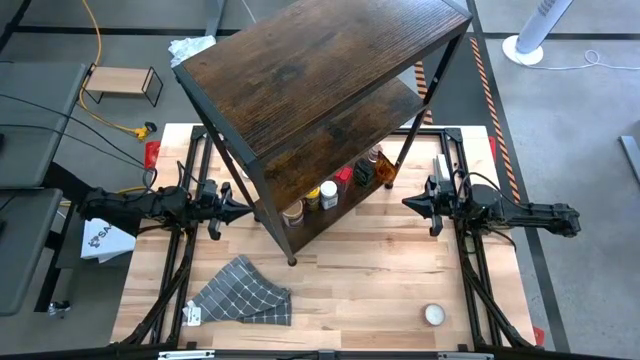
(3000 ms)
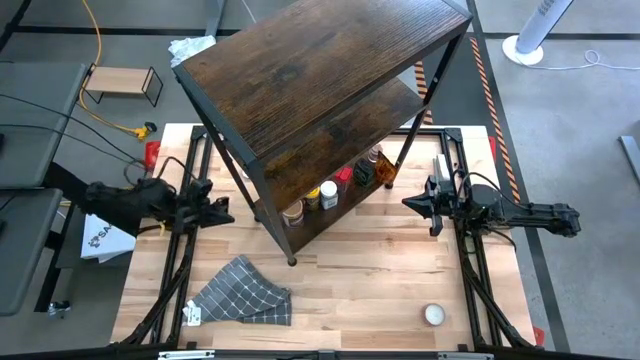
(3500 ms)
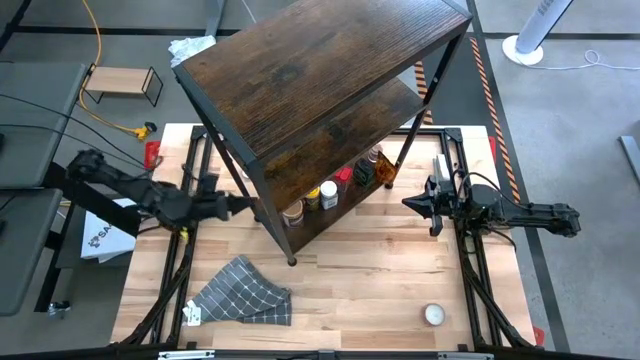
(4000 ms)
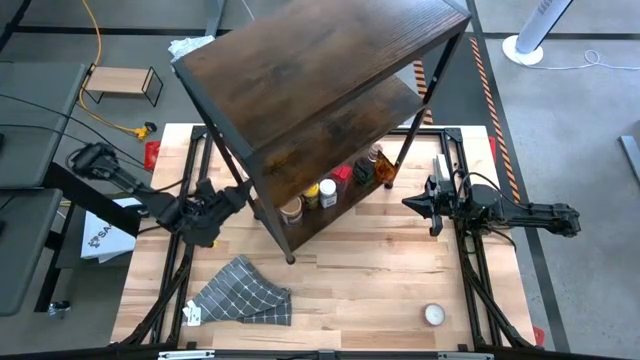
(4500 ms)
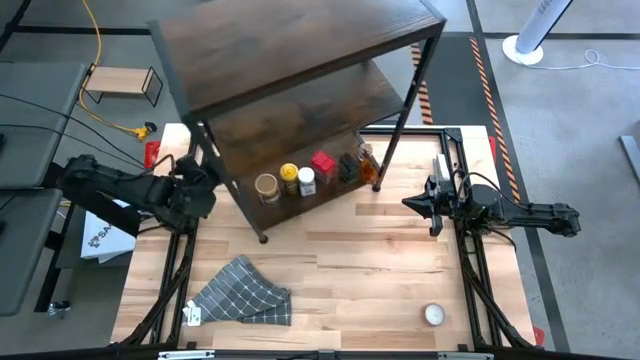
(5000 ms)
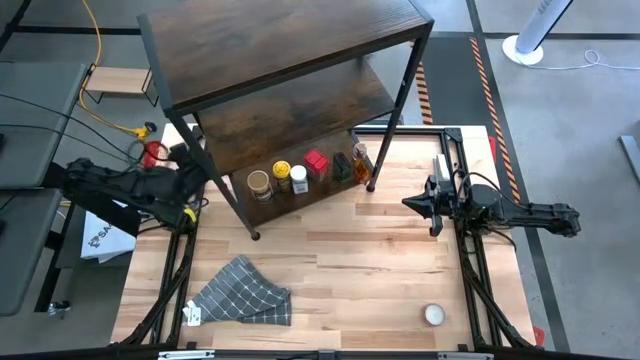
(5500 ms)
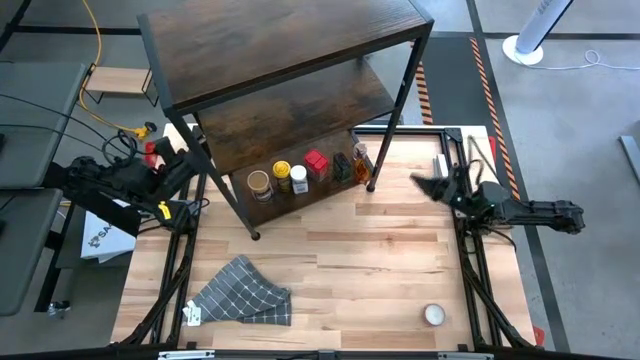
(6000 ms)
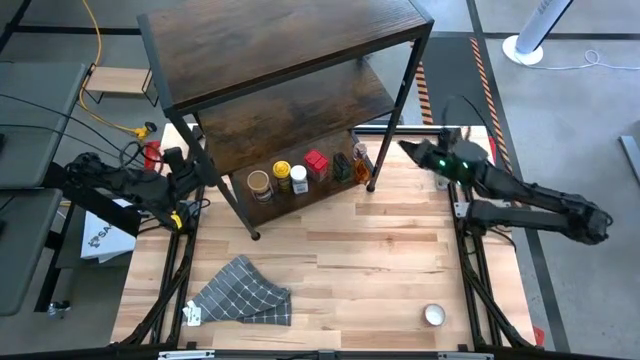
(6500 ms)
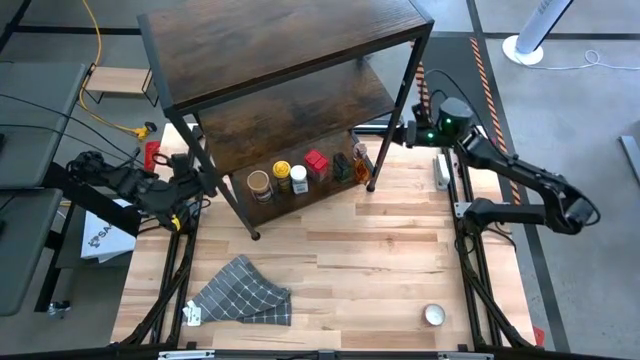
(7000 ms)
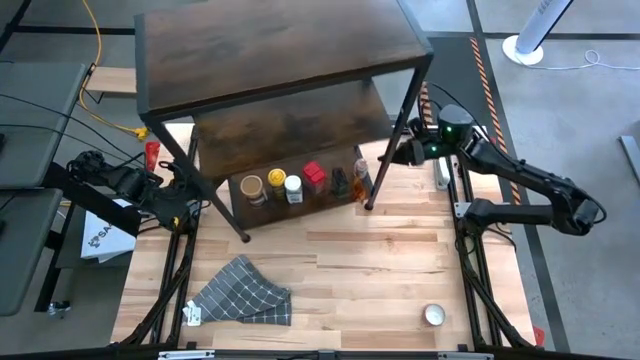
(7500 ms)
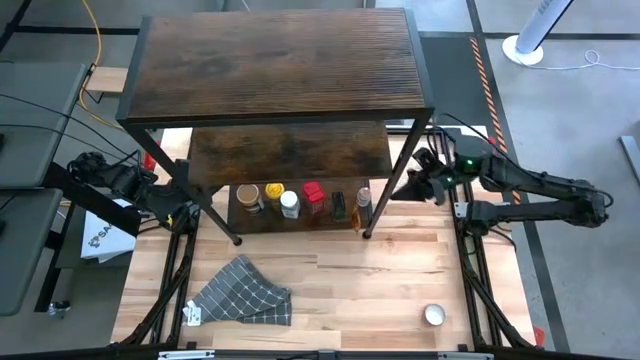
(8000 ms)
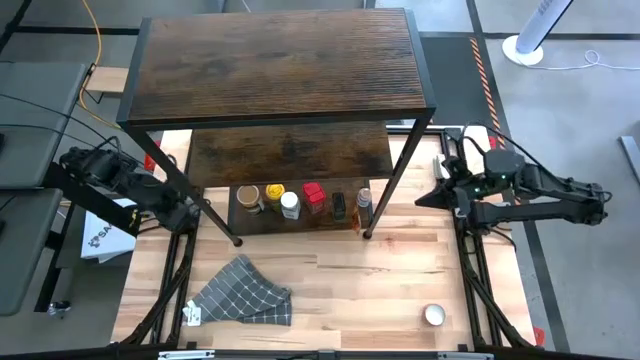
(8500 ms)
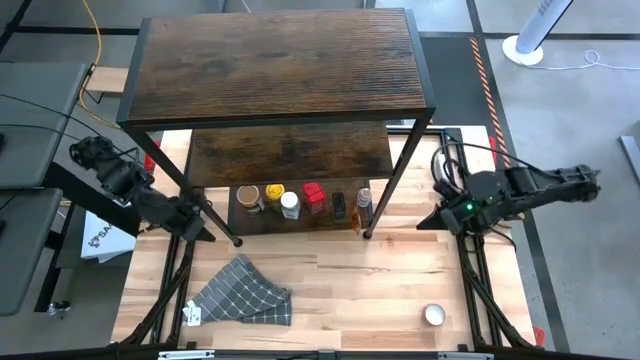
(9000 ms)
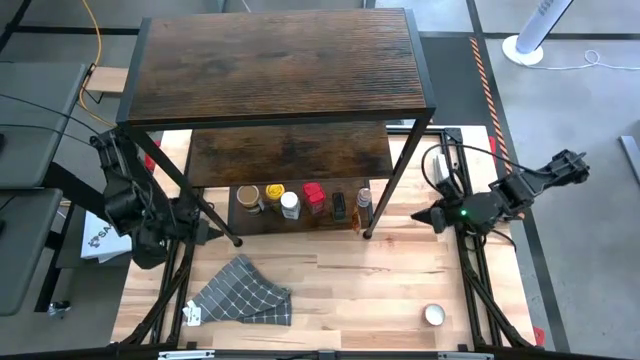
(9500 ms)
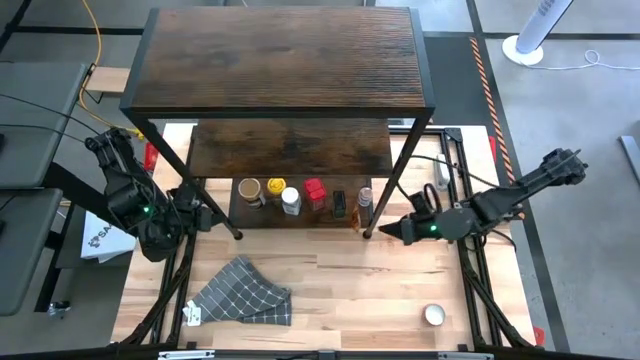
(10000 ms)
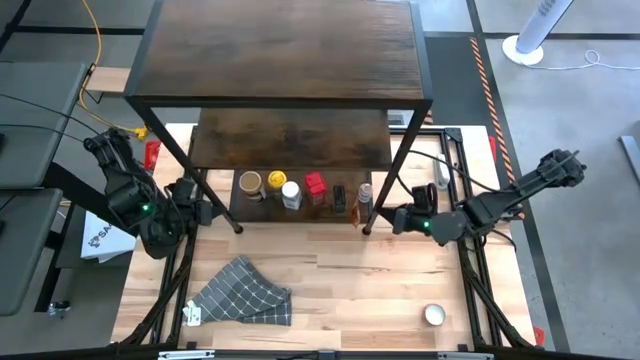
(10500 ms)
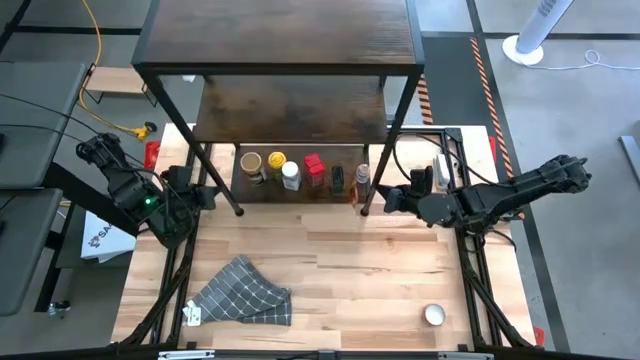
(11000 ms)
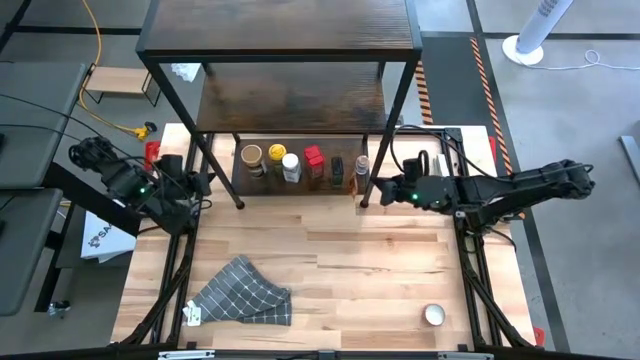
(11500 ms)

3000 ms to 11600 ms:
Task: Shelf spices
Adjust the shelf

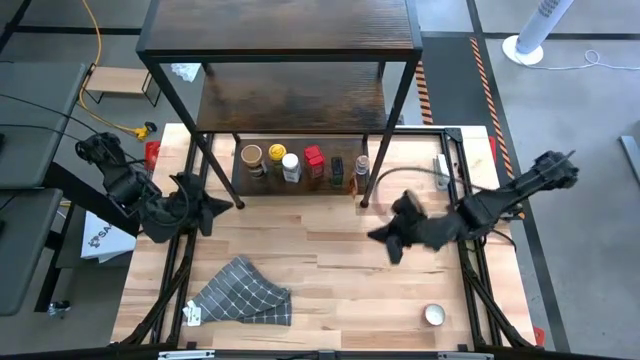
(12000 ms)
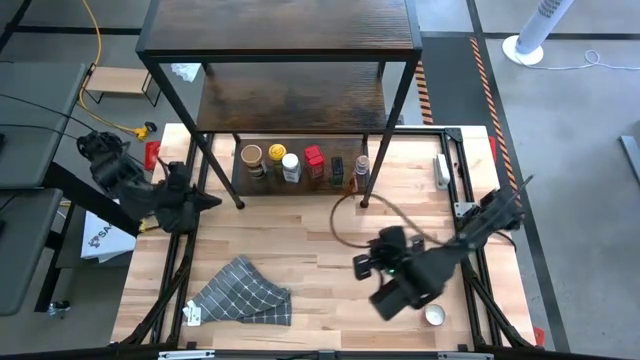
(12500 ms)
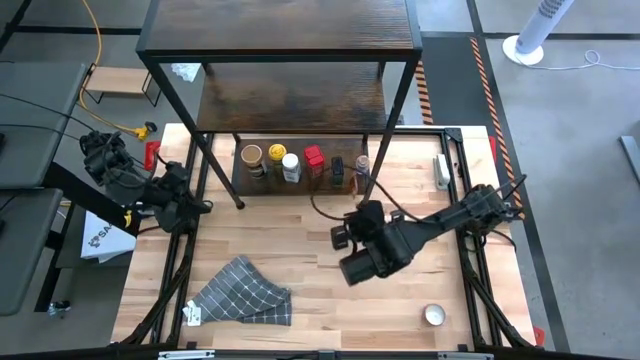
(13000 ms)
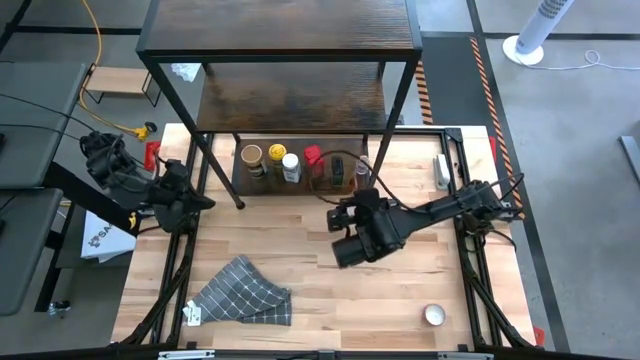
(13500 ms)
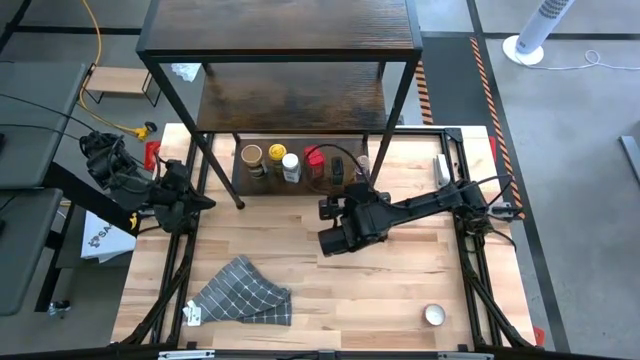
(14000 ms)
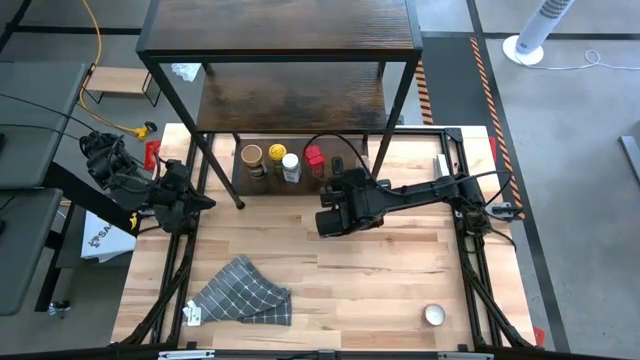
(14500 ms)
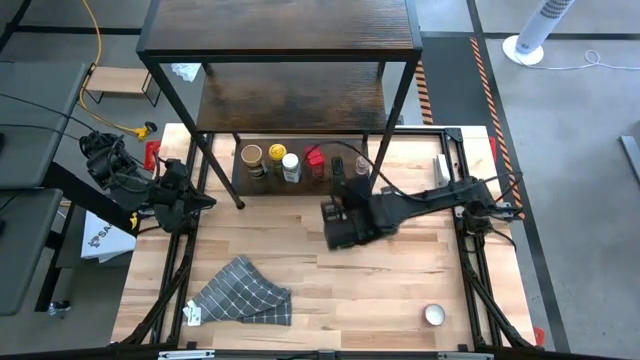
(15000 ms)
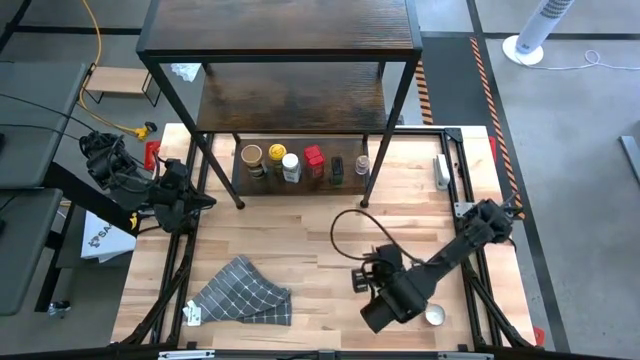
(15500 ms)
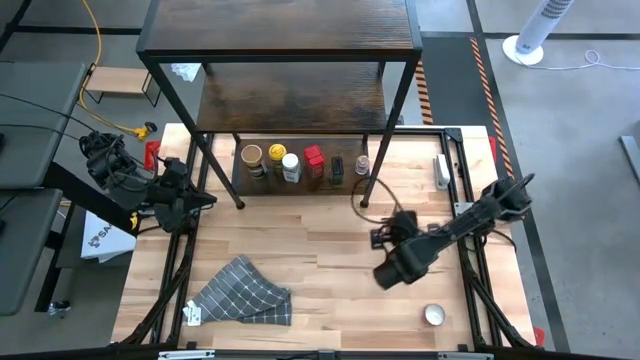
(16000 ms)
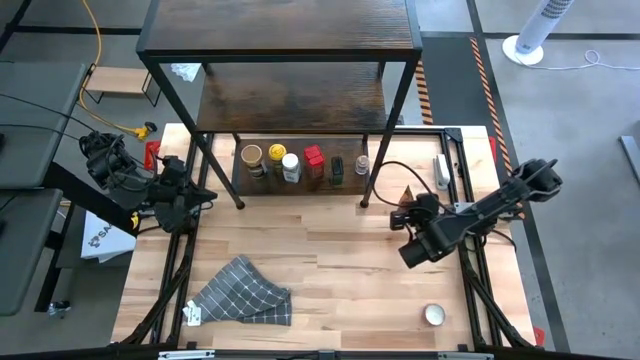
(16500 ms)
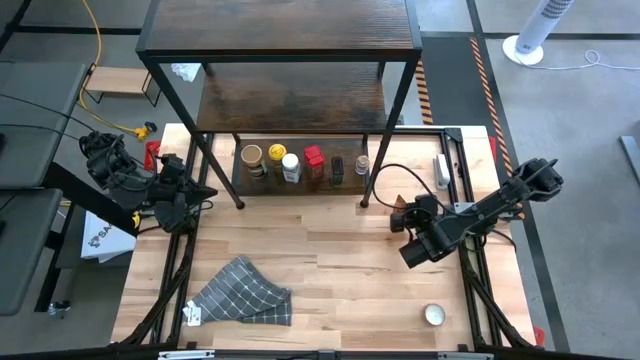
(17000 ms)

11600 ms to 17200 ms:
Remove the orange seasoning pack from the shelf

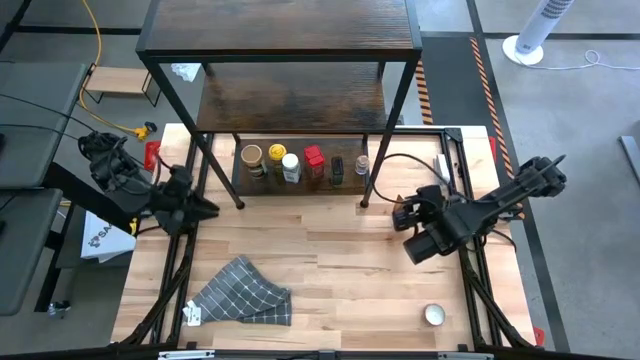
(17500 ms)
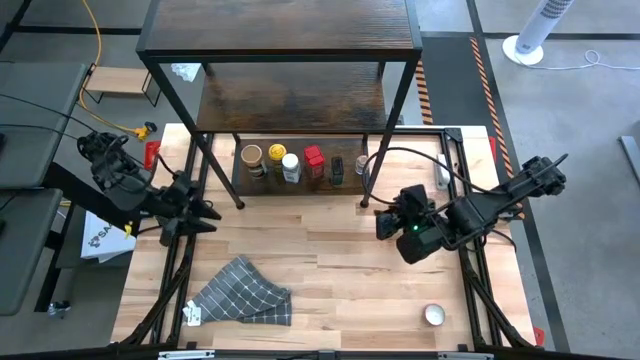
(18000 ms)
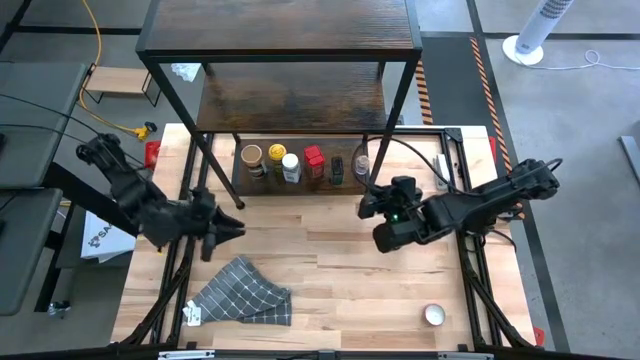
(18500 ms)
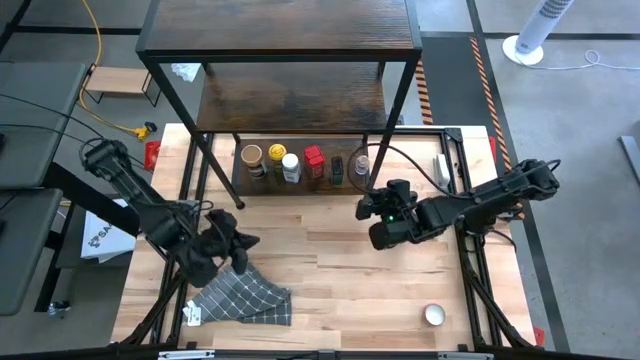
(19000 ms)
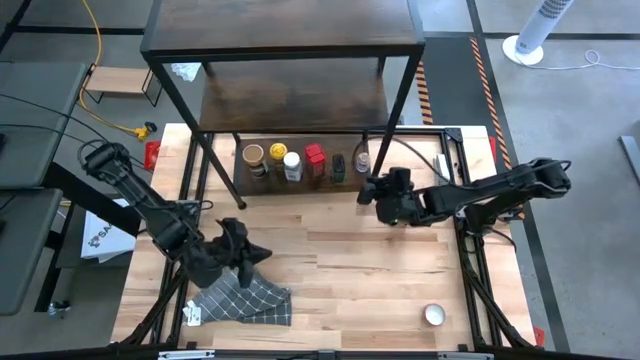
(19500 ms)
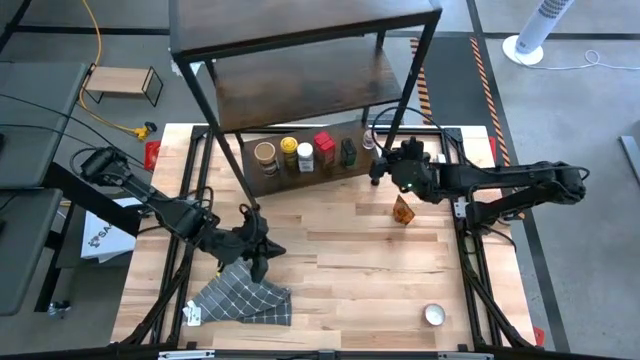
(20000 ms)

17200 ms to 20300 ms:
Adjust the shelf

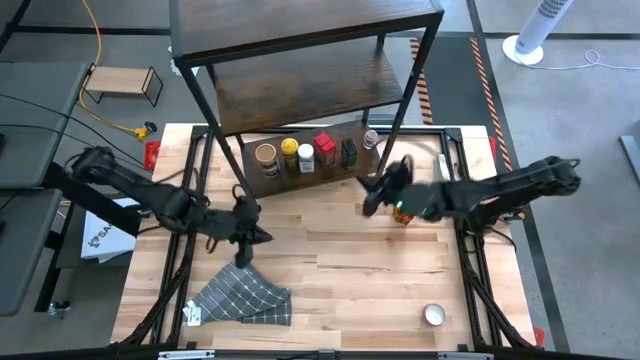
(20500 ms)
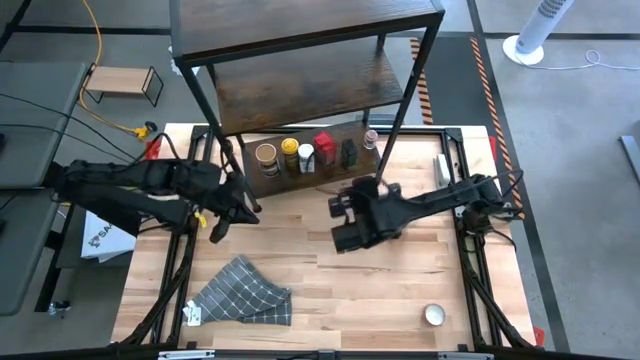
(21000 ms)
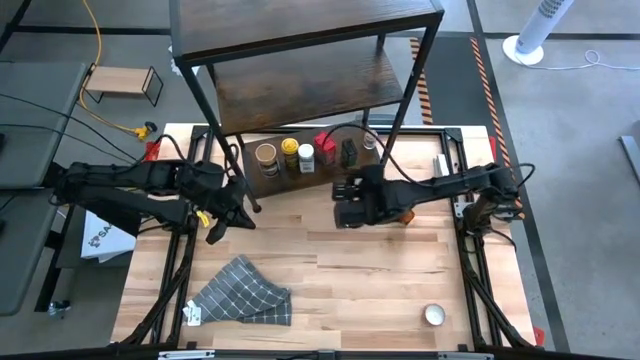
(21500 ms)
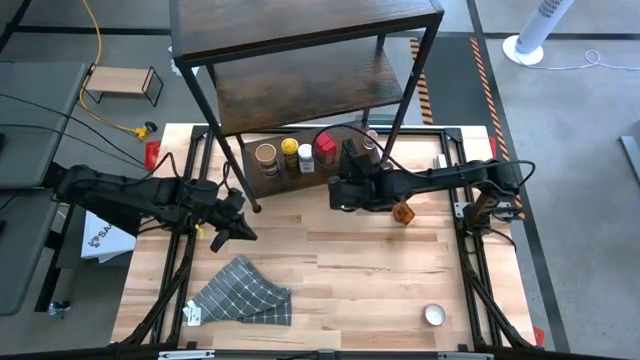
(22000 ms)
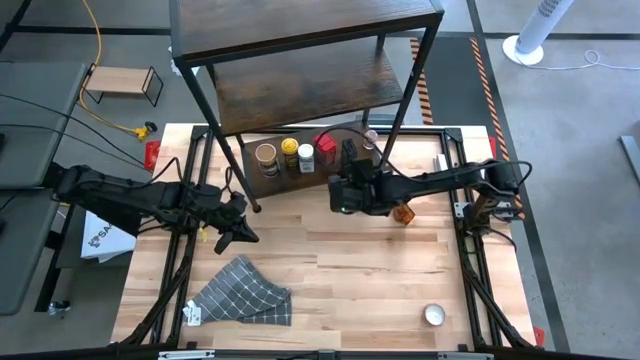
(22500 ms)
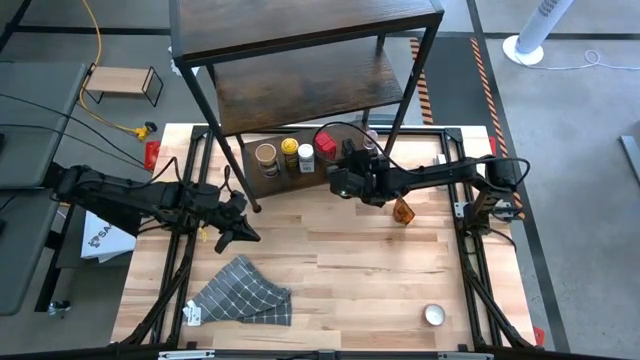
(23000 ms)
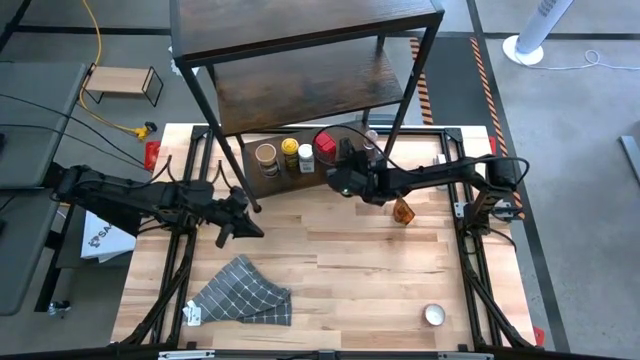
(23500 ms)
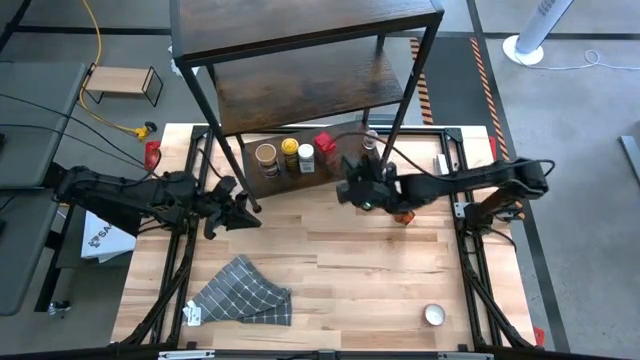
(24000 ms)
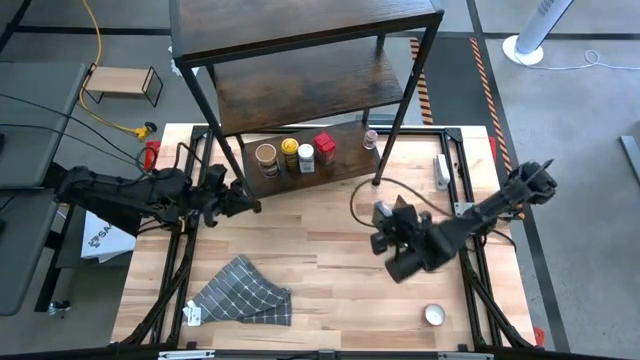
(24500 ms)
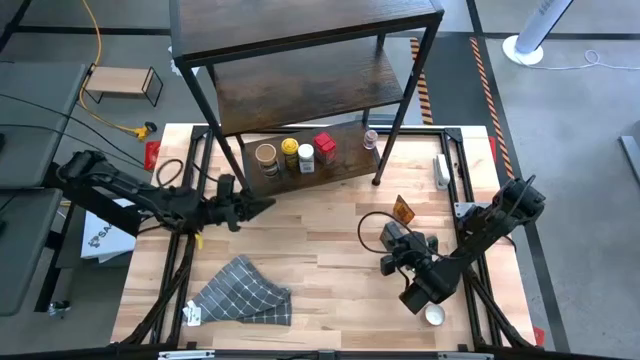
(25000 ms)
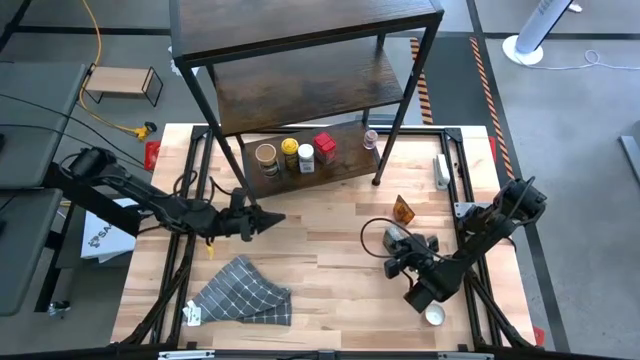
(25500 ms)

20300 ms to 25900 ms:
Remove the black seasoning can from the shelf
